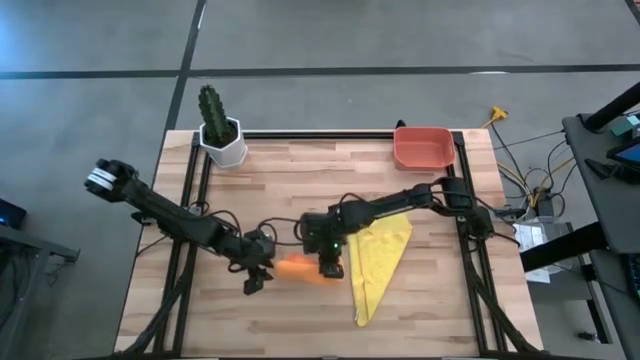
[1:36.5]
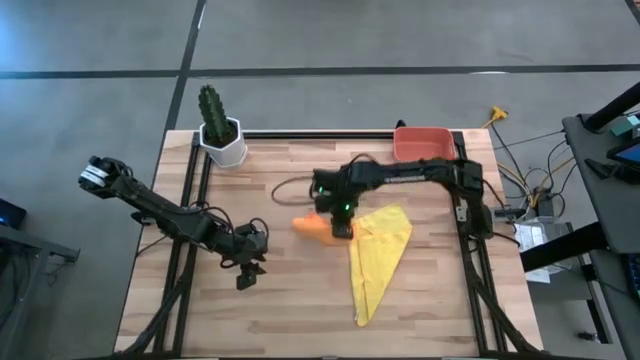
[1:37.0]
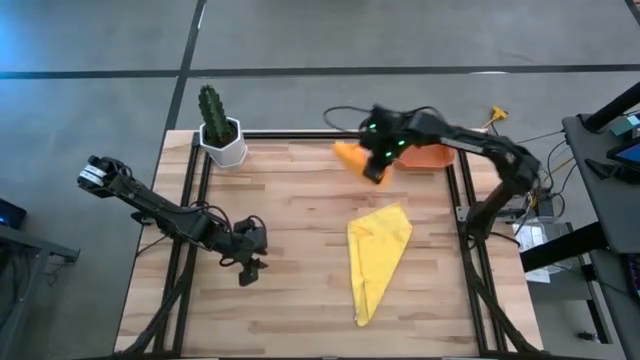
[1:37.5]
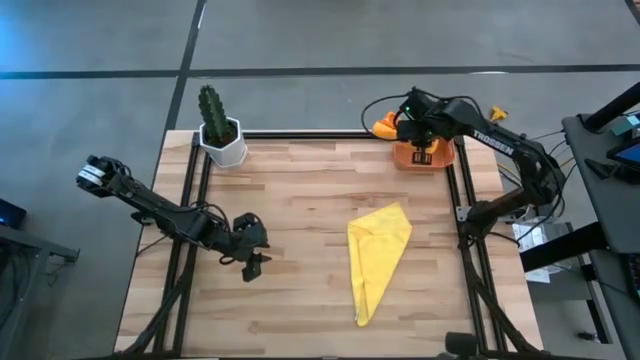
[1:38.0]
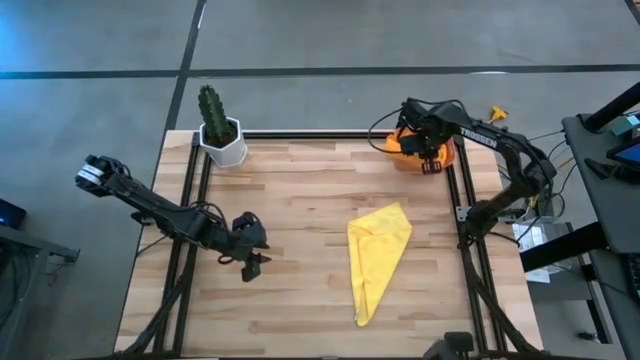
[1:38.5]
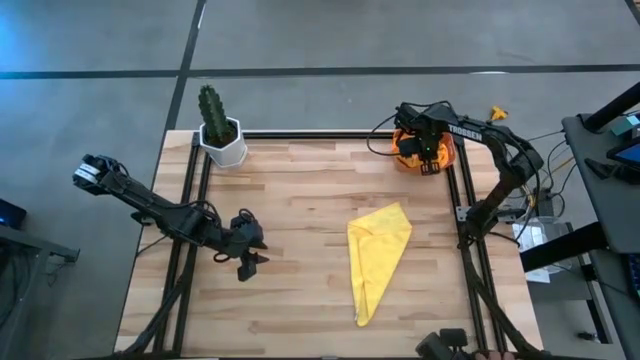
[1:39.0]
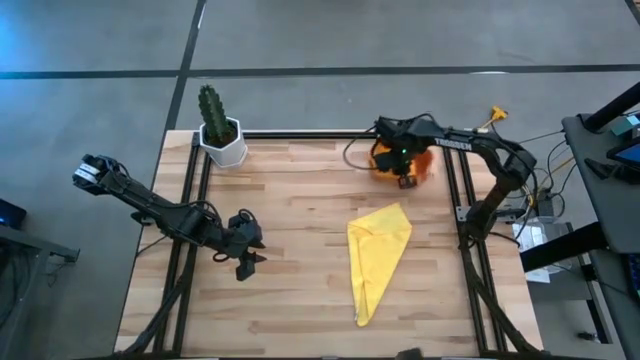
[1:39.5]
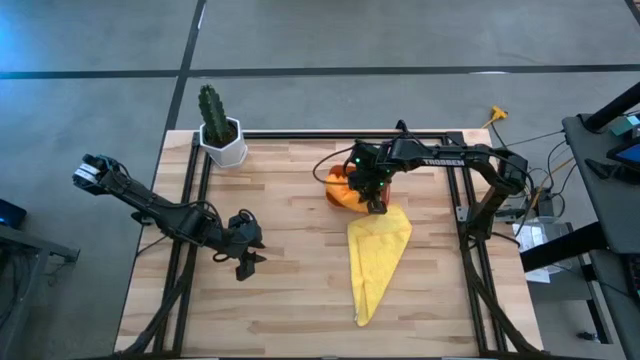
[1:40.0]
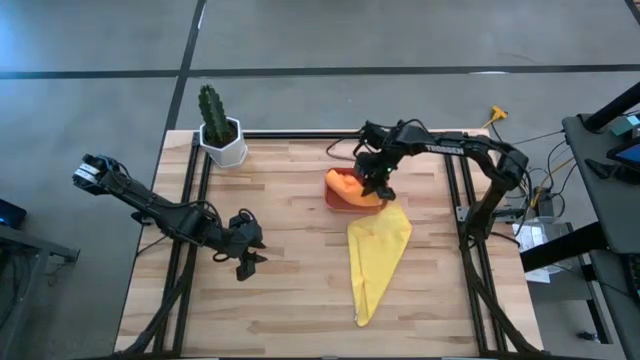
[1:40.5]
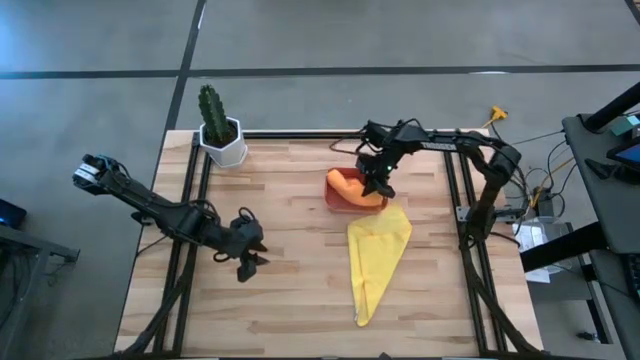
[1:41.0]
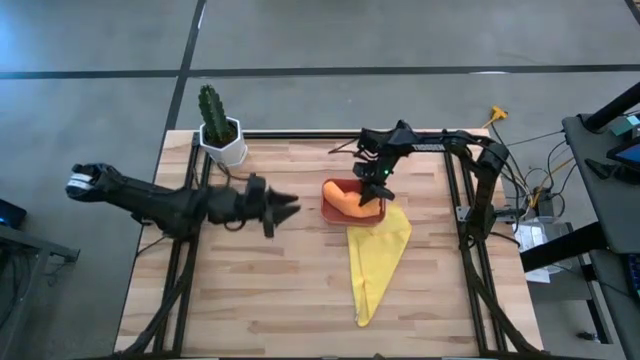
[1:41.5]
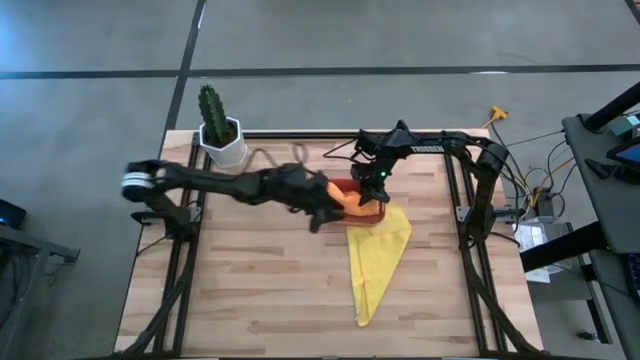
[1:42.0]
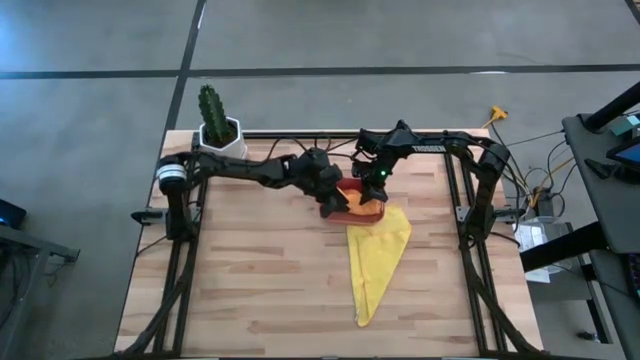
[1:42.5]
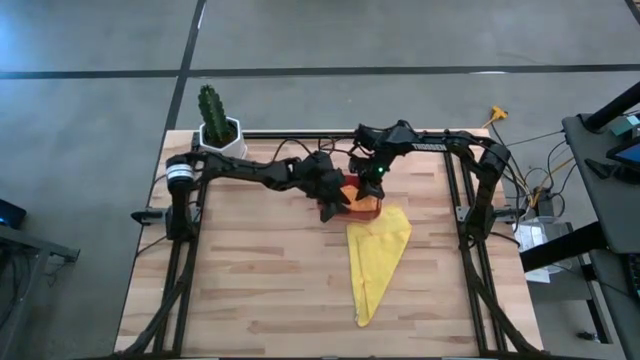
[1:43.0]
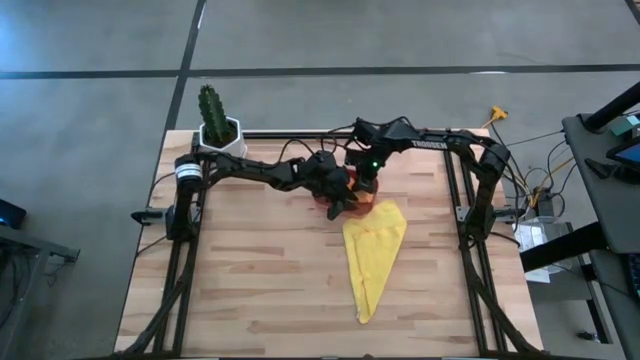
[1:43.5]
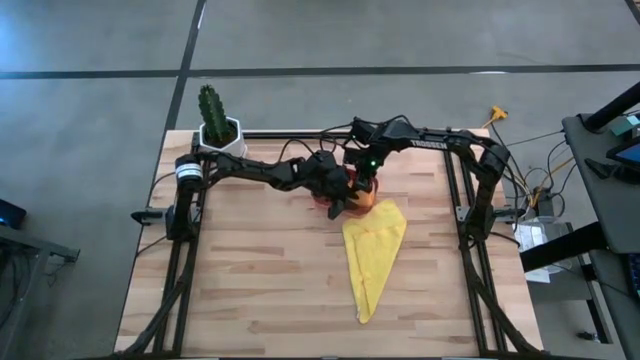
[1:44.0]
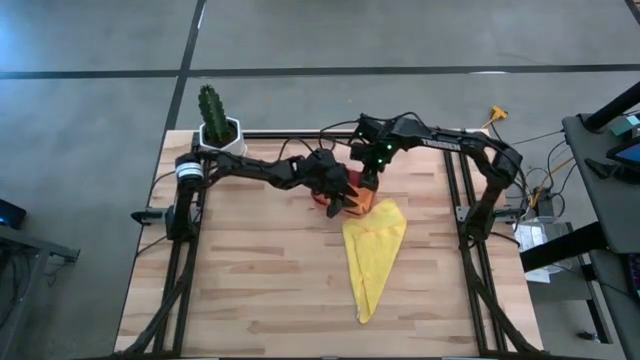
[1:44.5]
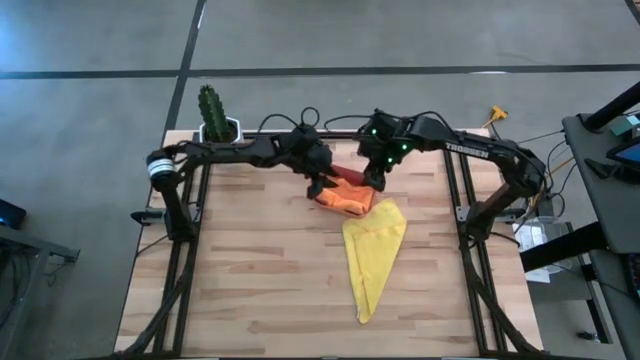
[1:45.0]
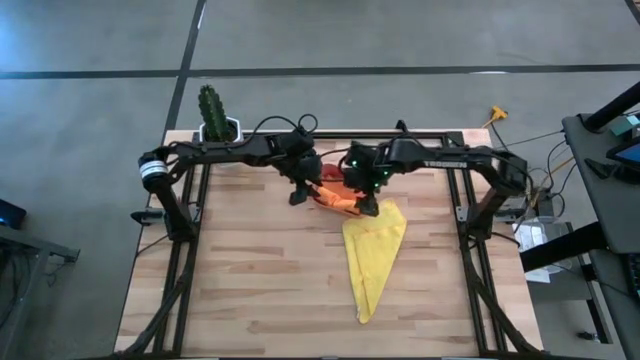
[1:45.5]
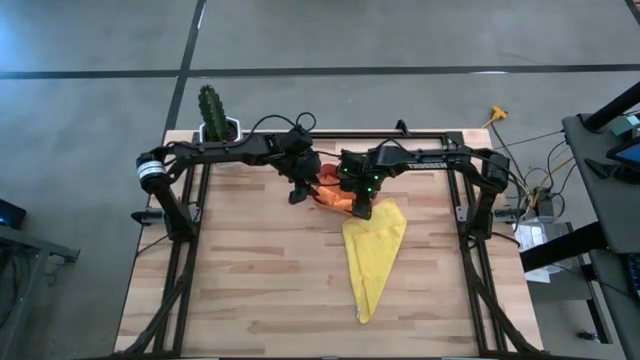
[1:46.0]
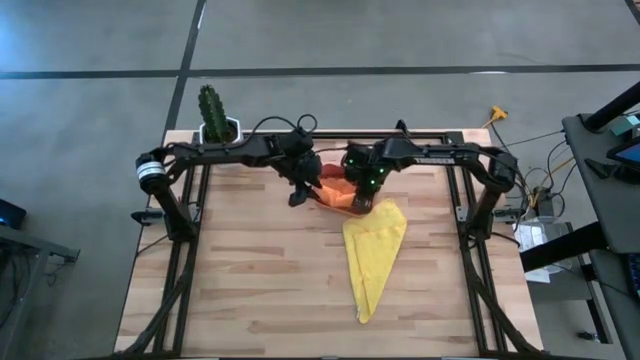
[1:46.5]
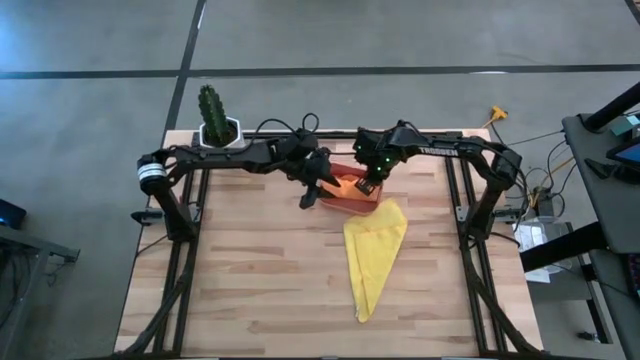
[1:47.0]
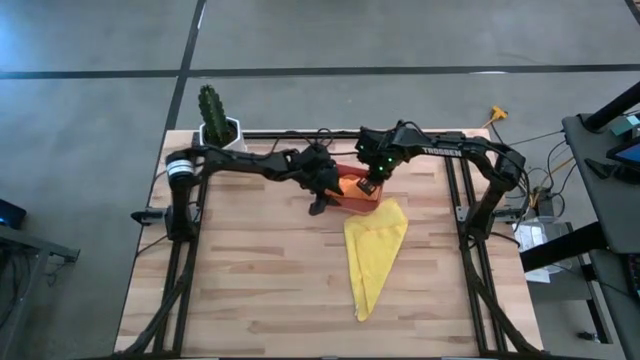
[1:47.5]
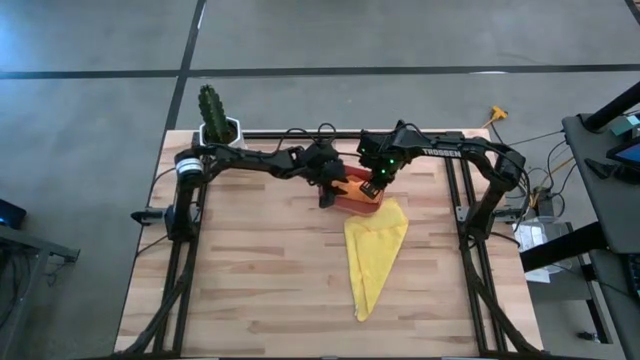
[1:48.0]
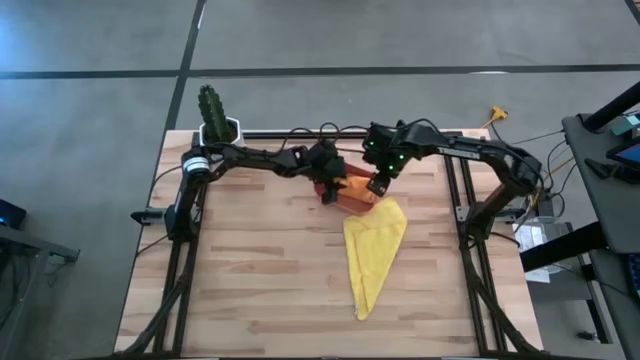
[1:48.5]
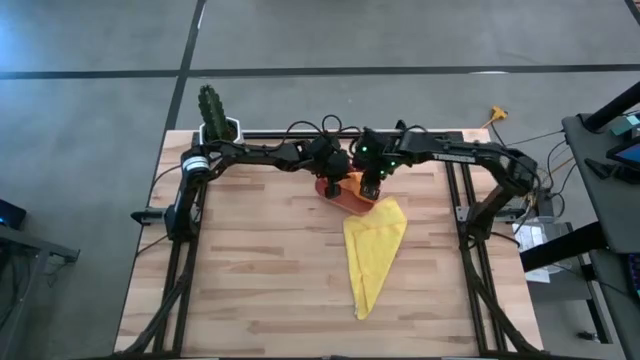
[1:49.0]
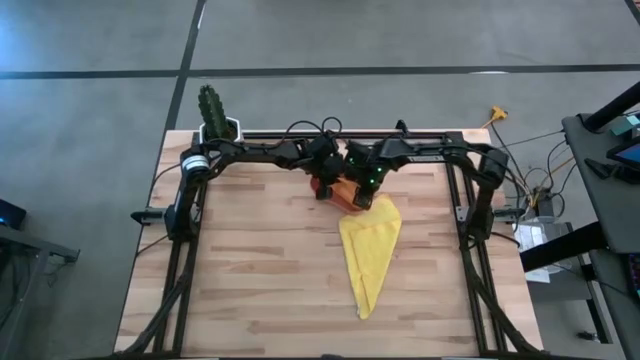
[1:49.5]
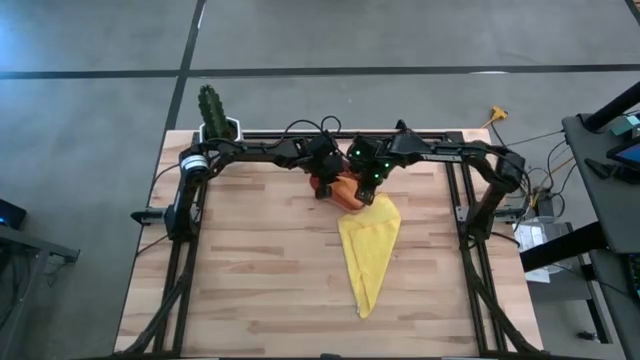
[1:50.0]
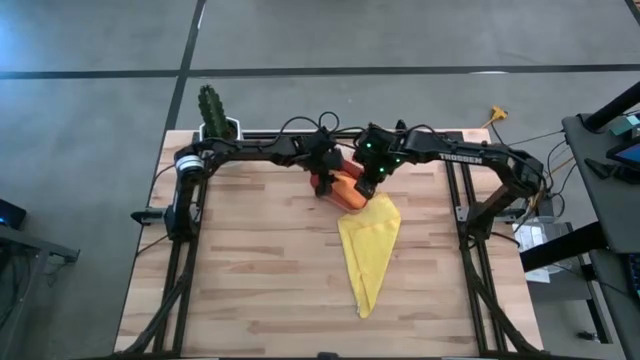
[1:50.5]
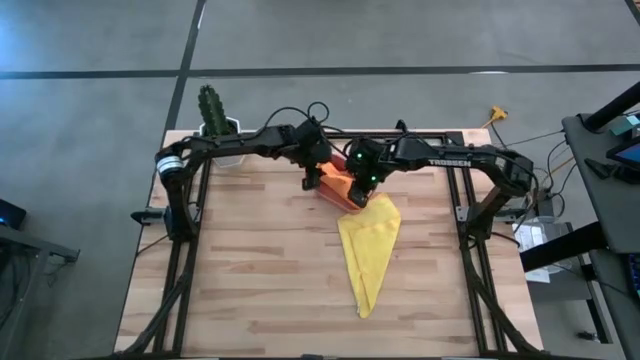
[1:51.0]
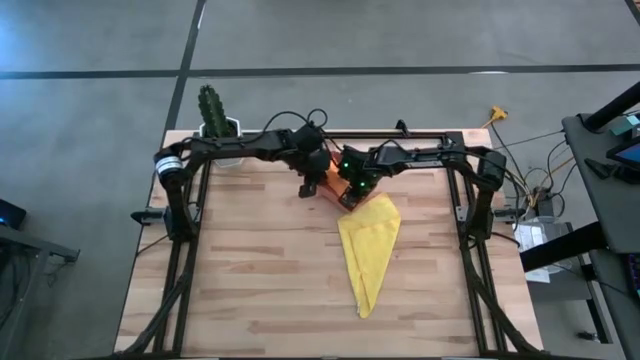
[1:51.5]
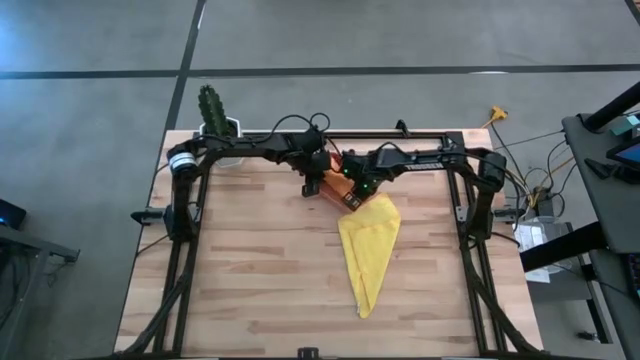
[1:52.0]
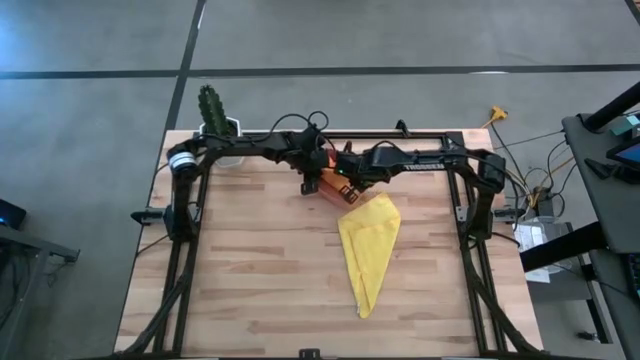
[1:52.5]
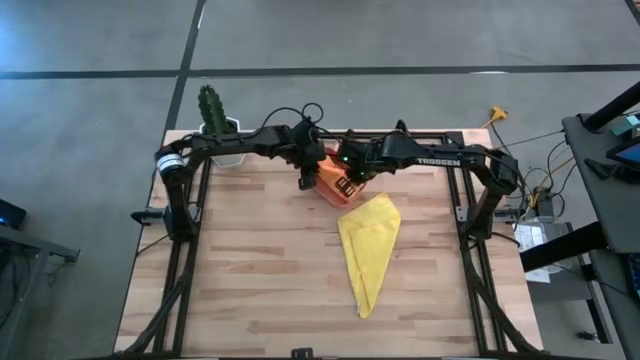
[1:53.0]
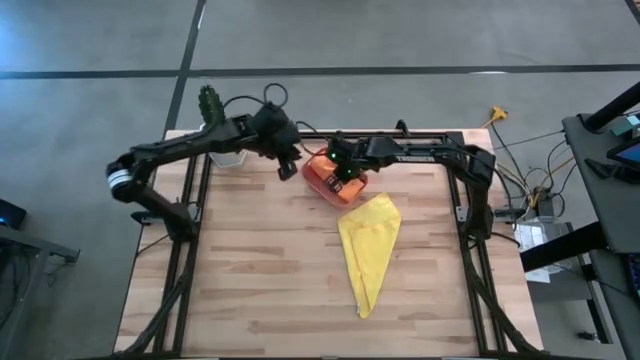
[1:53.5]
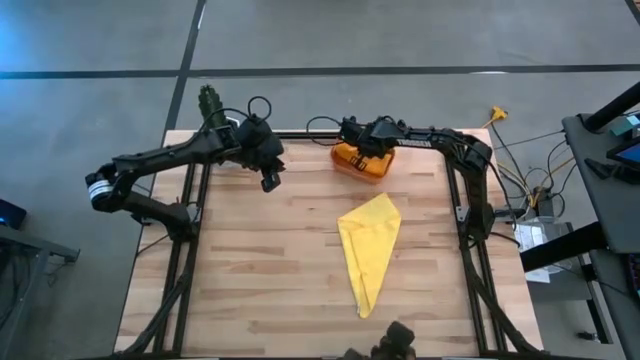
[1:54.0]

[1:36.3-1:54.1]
Task: Roll microfiber towels into tight, uniform cylinder then place into a basket
Put the orange towel into the orange bin

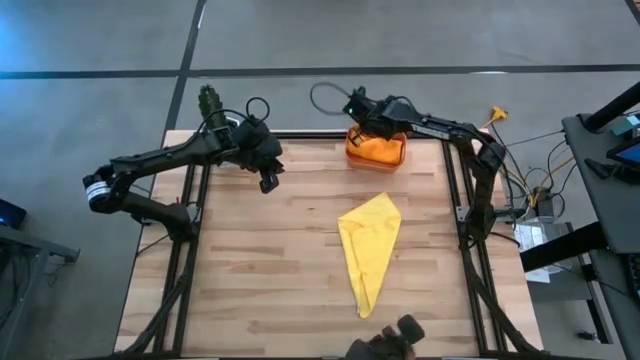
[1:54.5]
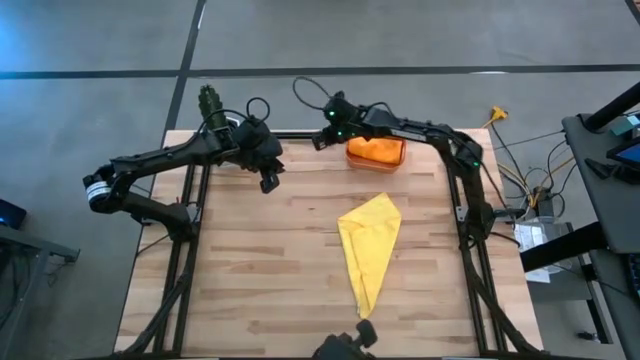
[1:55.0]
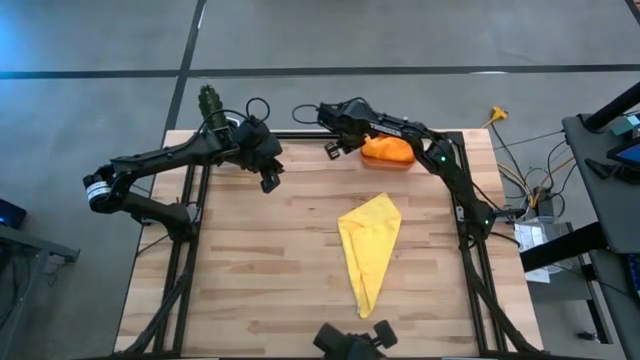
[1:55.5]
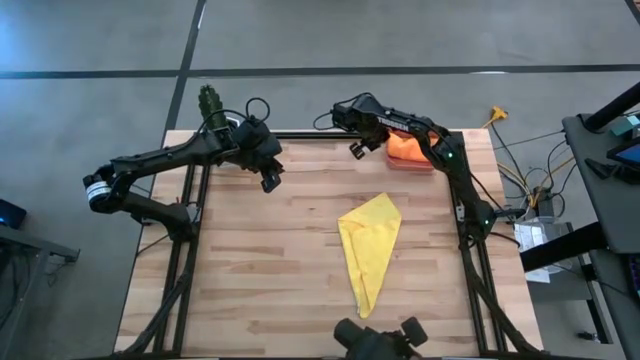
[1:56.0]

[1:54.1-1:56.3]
Move the orange bin to the top right corner of the table
